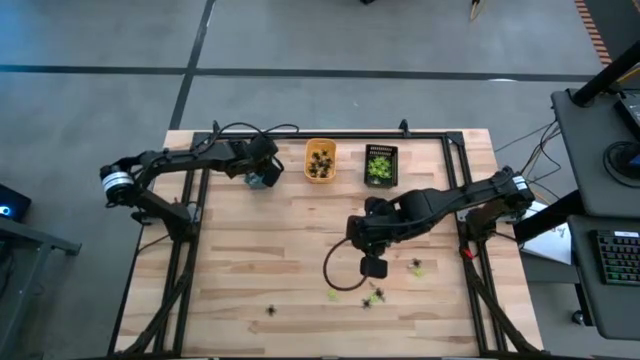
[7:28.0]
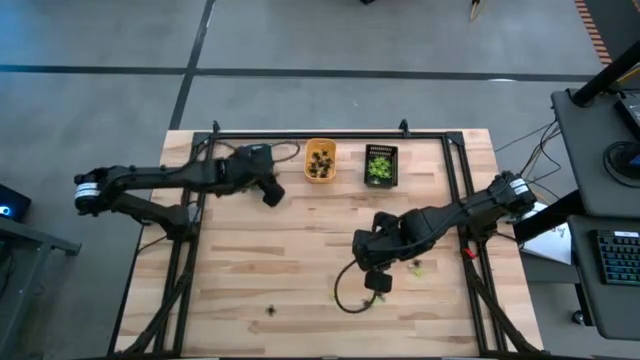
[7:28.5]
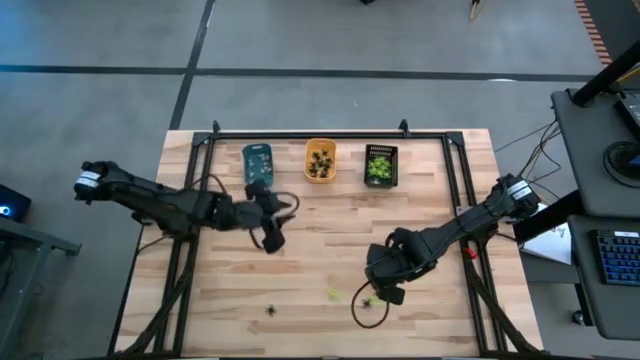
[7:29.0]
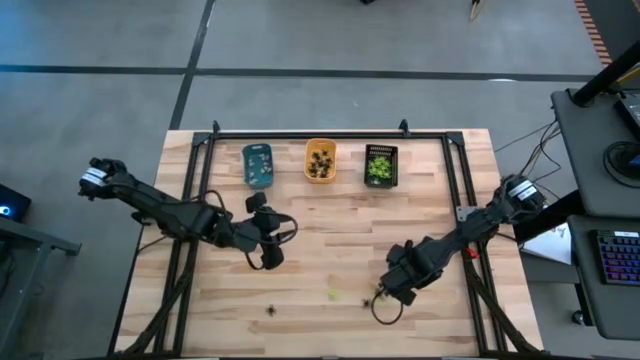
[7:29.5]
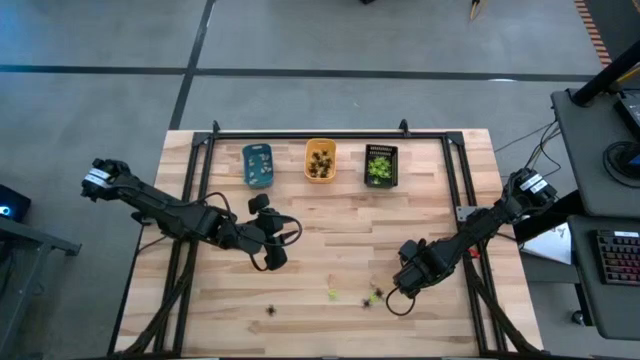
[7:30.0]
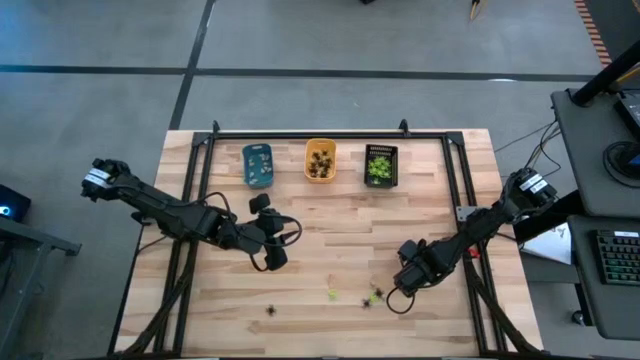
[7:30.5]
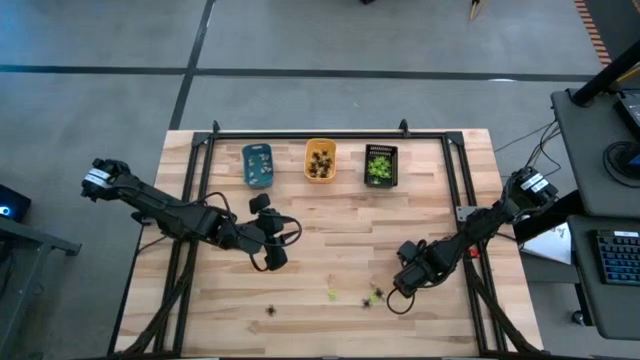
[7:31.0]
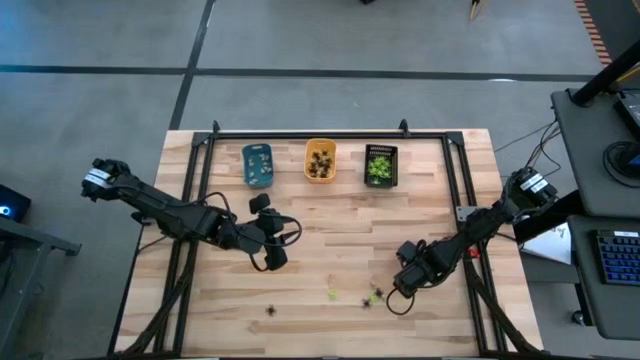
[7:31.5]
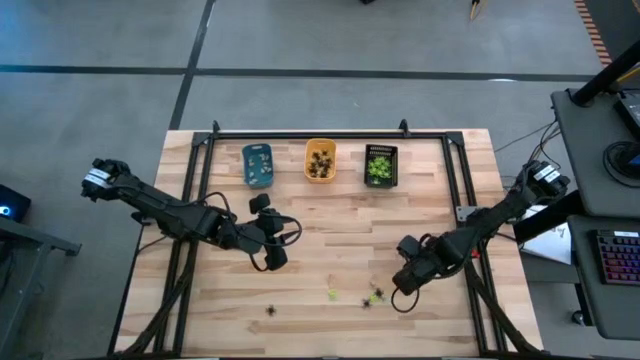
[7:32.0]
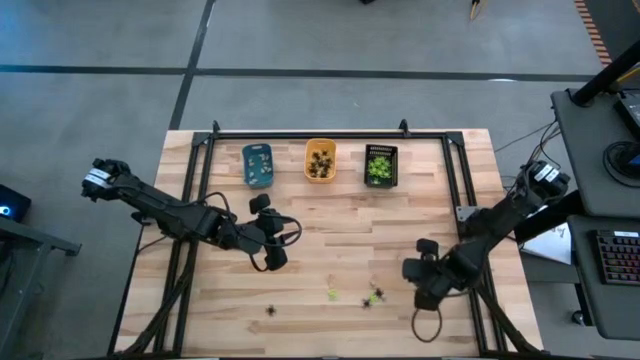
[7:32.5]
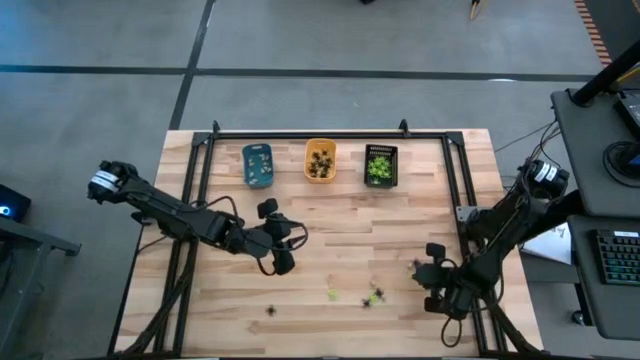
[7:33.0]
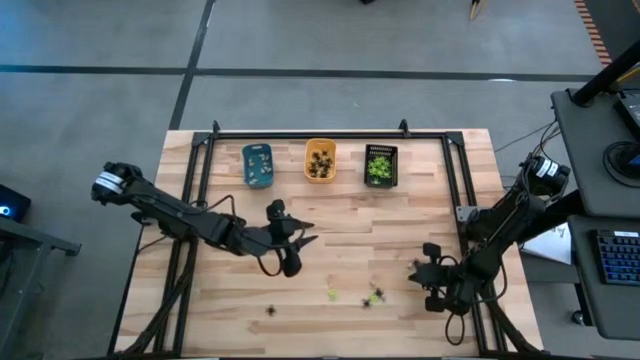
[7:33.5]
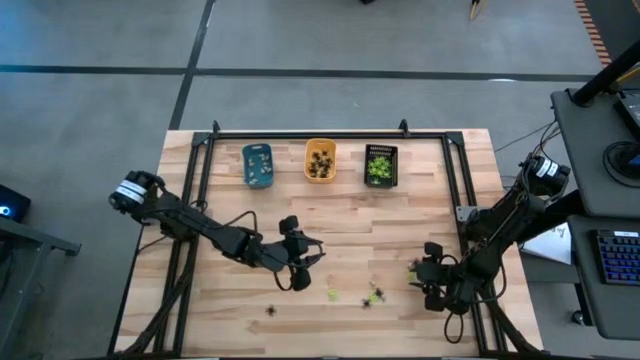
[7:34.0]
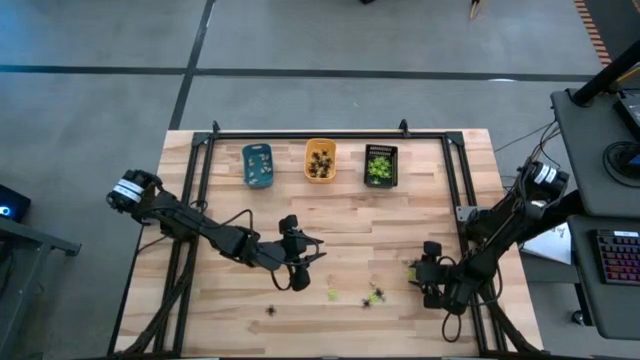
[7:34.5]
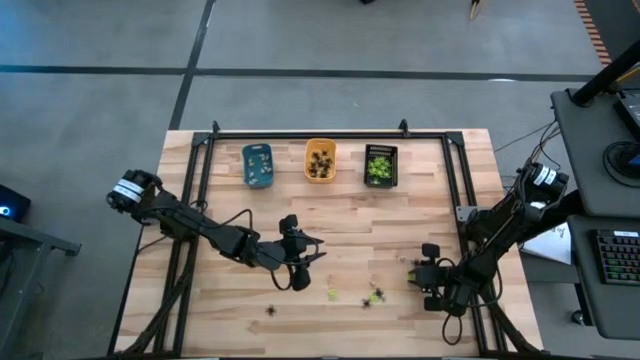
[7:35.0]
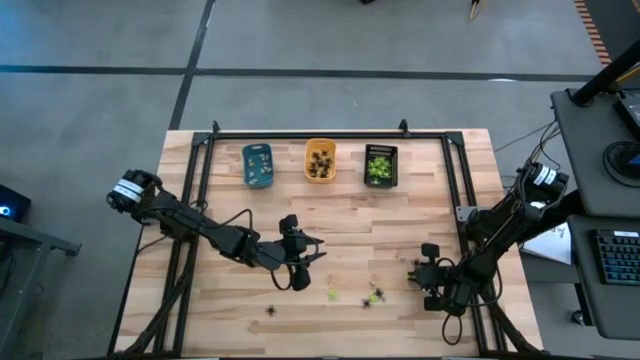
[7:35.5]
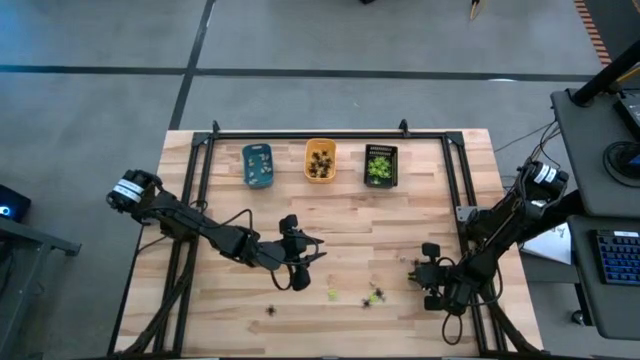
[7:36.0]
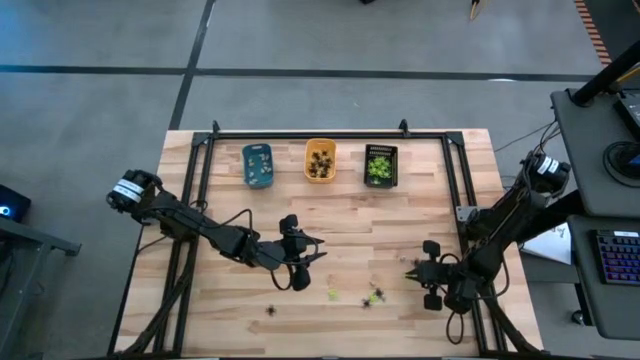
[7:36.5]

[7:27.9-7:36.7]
Task: Sort Halloween decoration
Put the green spider toy into the black bin

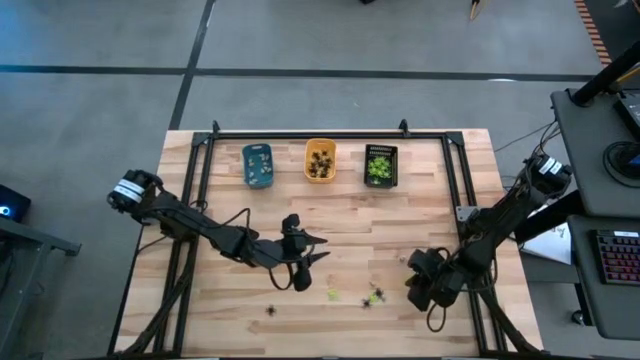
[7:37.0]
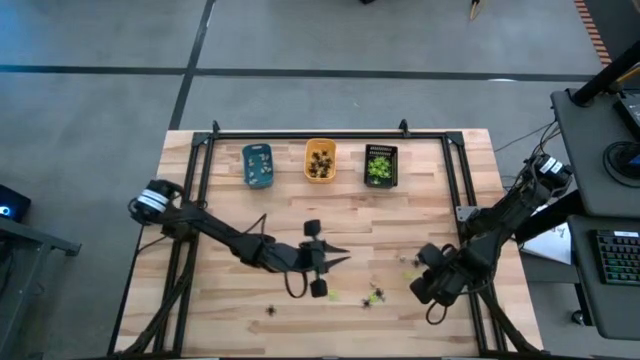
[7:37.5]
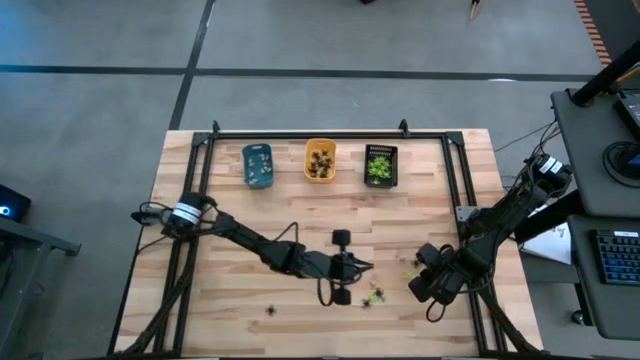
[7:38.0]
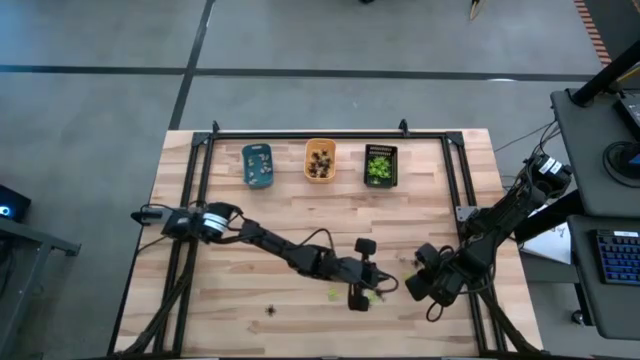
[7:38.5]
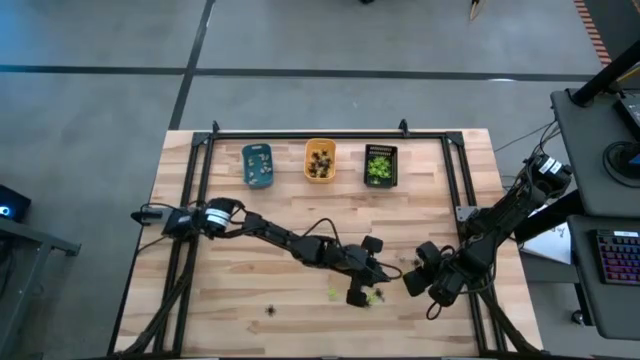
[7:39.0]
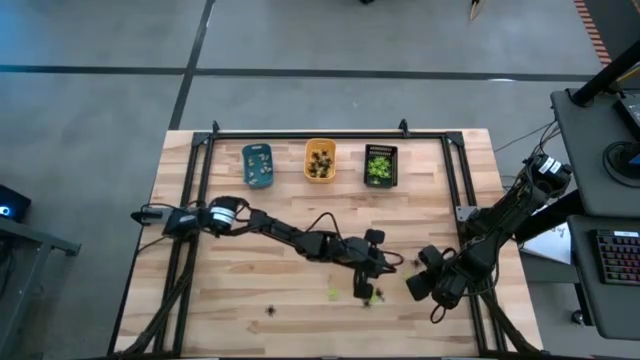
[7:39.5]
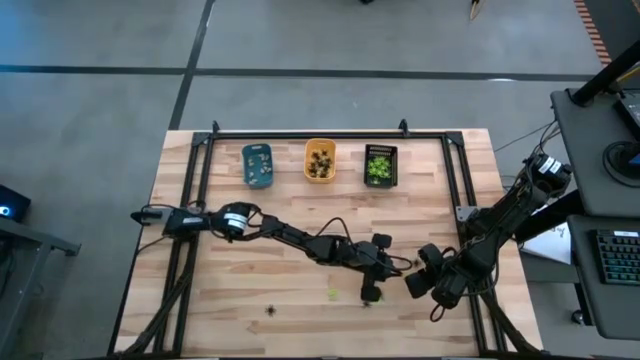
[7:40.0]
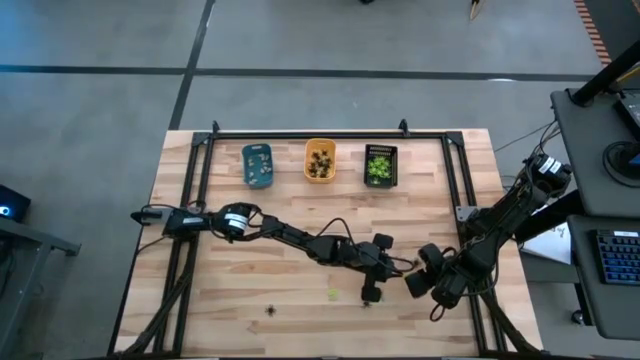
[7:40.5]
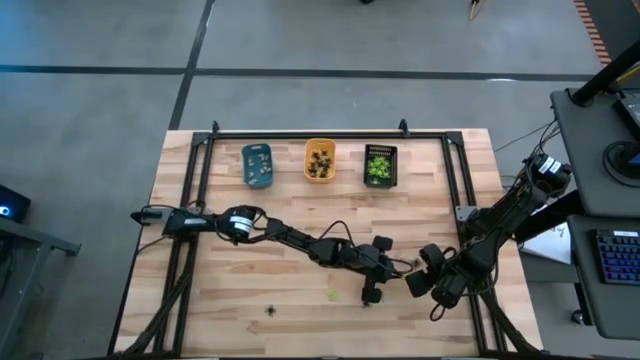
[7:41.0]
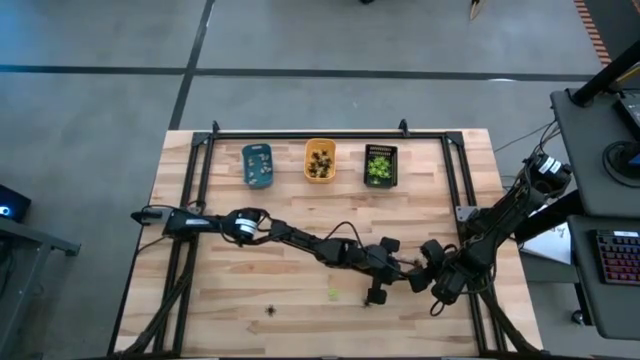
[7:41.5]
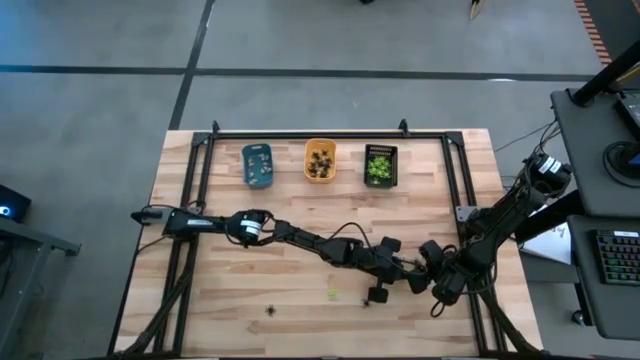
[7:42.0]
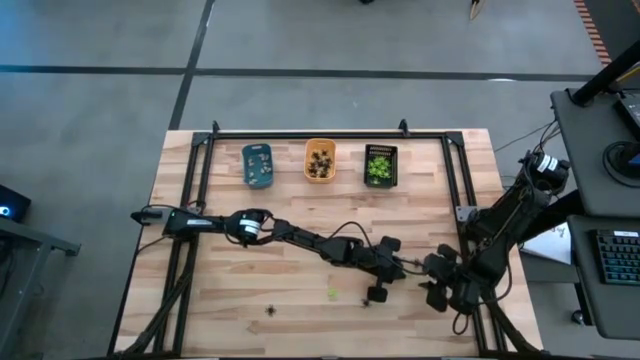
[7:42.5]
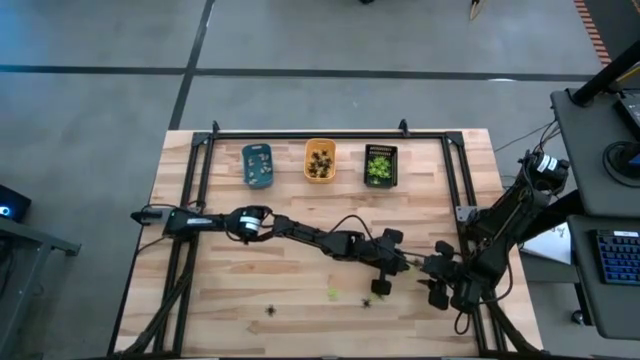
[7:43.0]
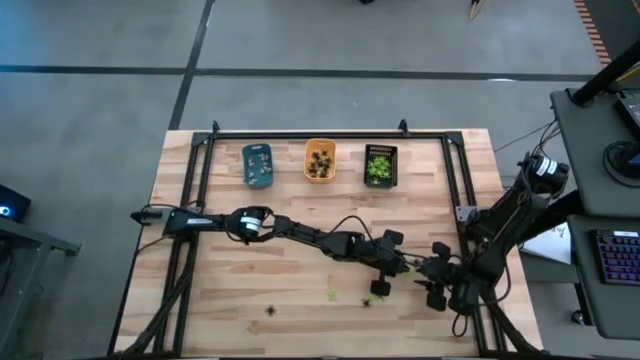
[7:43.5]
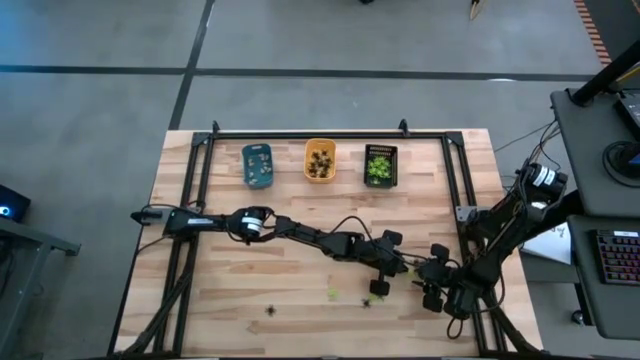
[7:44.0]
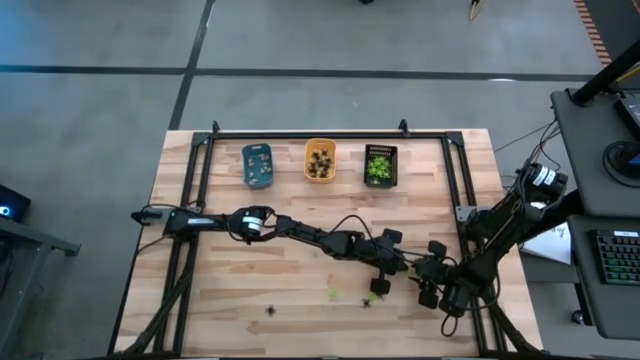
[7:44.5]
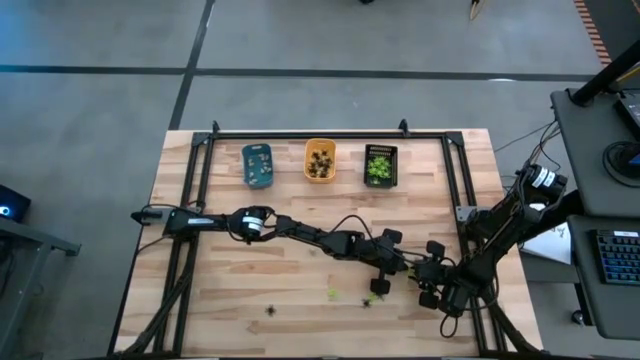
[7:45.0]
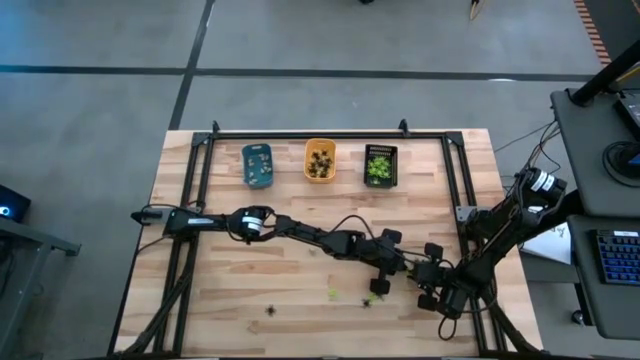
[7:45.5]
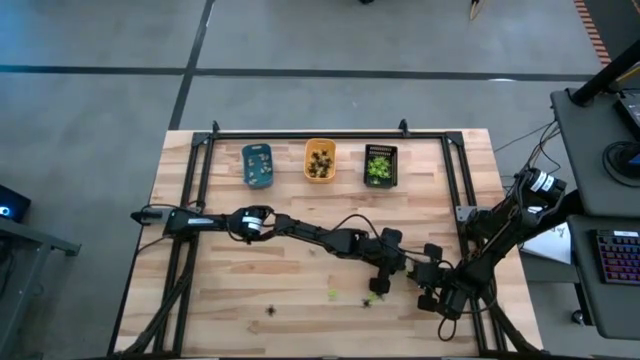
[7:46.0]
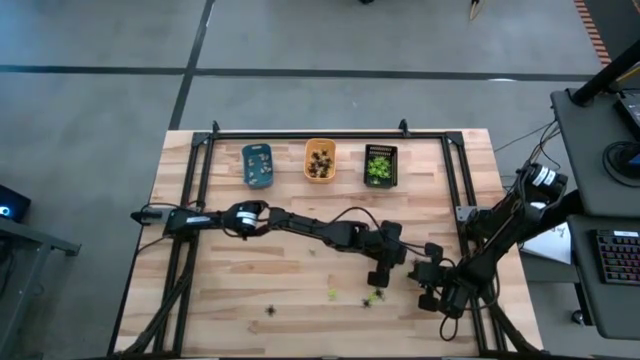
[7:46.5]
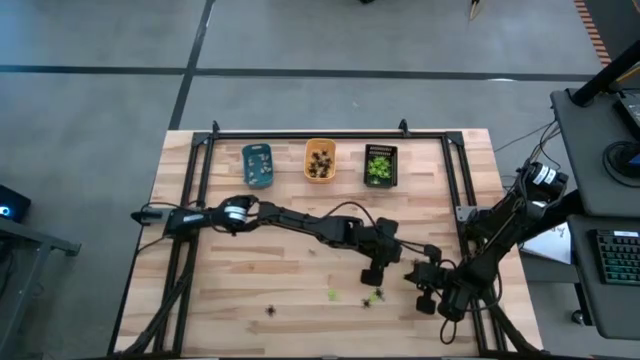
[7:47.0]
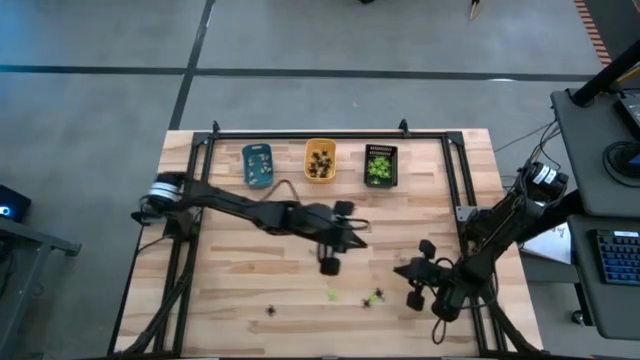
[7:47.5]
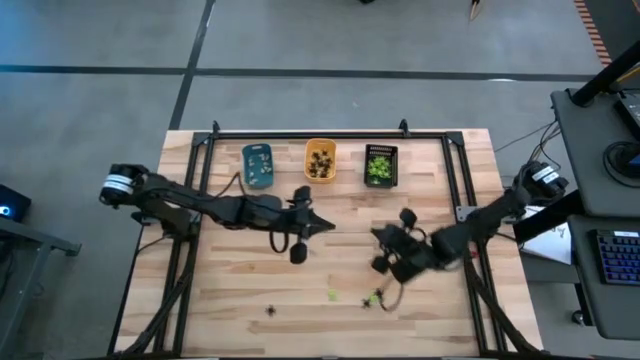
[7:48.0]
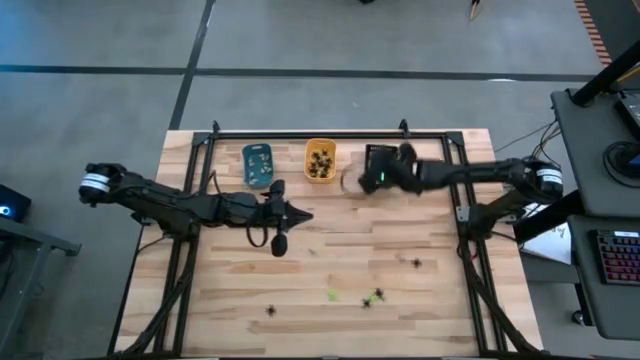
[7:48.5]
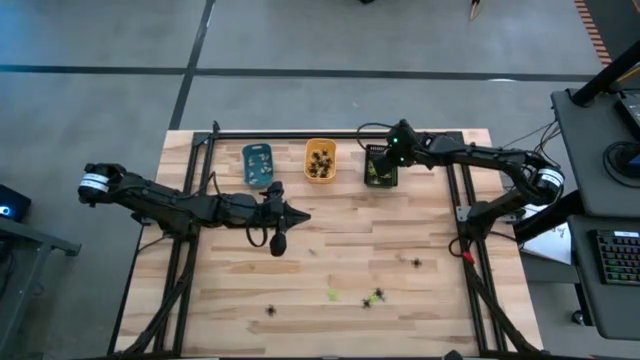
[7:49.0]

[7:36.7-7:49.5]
Put the green spider toy into the black bin
